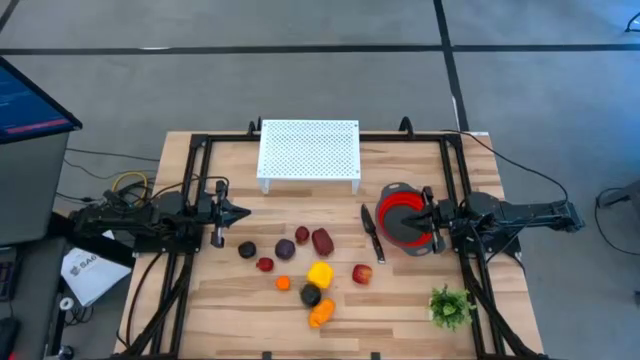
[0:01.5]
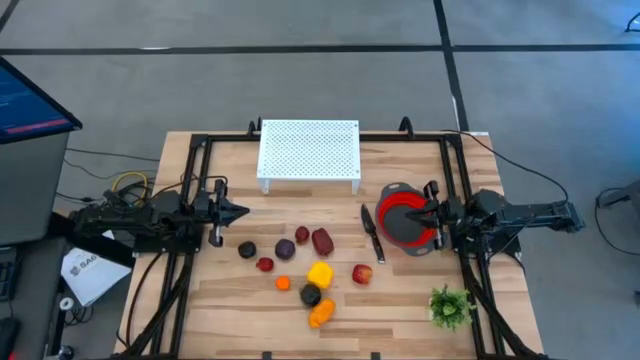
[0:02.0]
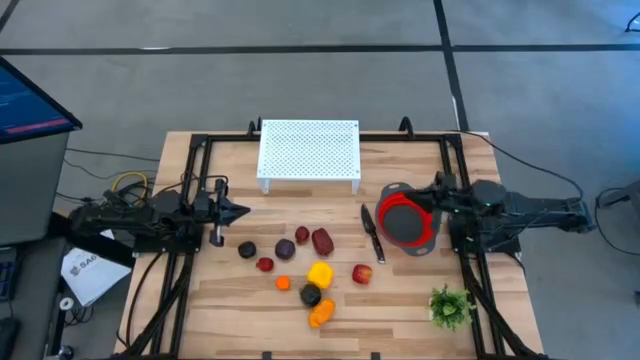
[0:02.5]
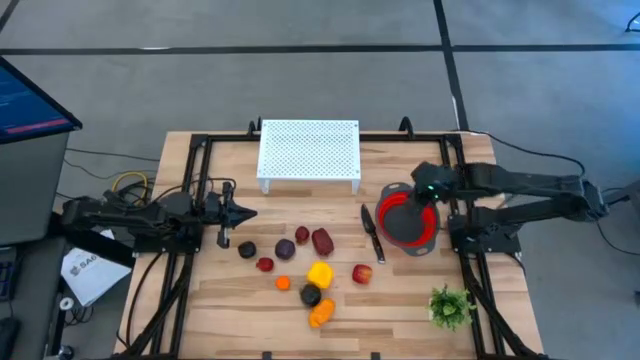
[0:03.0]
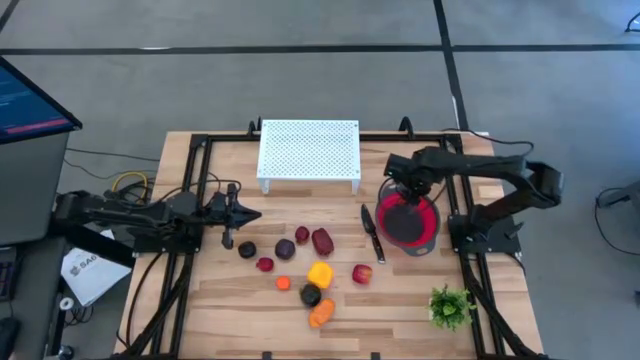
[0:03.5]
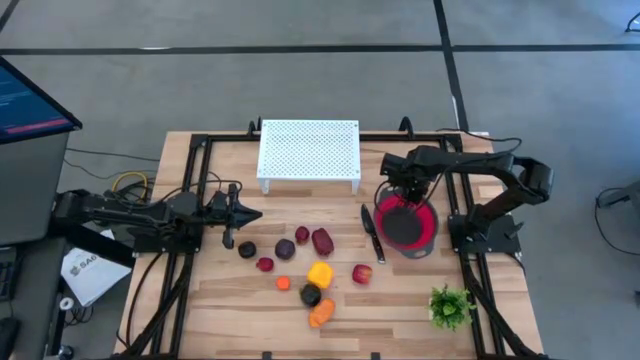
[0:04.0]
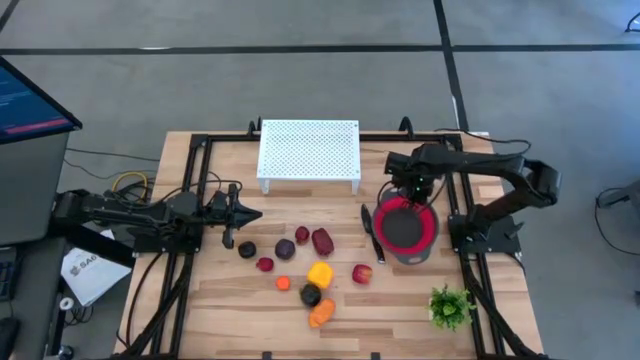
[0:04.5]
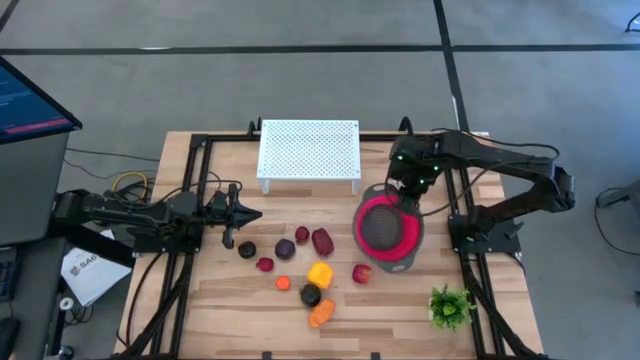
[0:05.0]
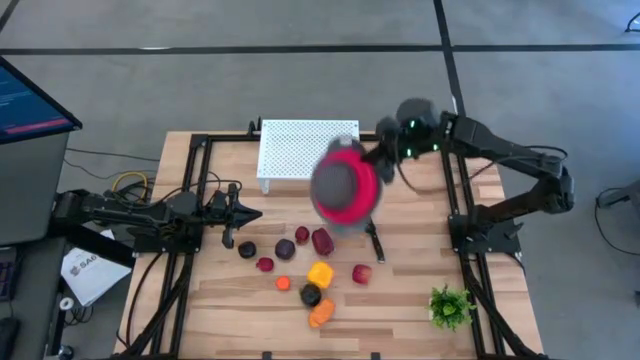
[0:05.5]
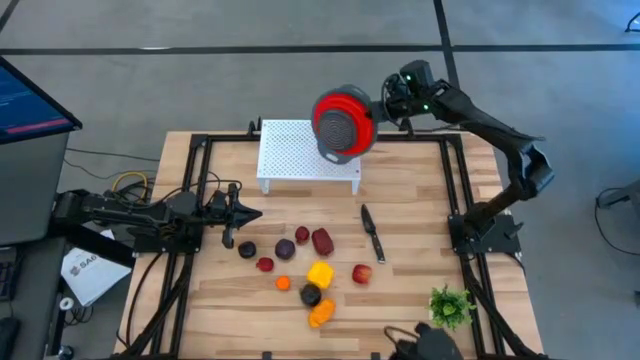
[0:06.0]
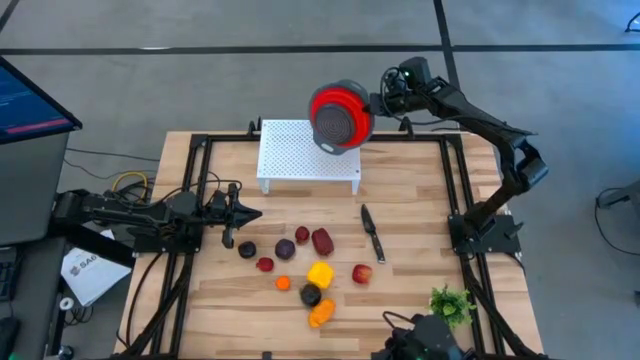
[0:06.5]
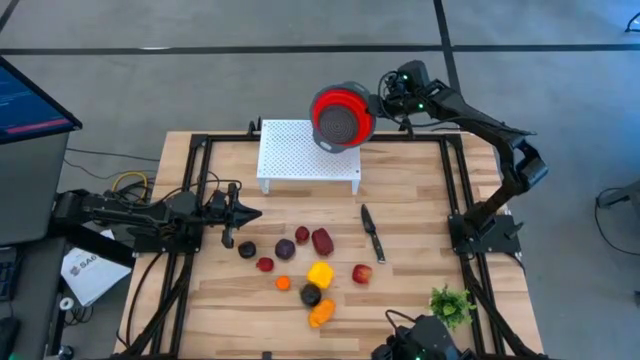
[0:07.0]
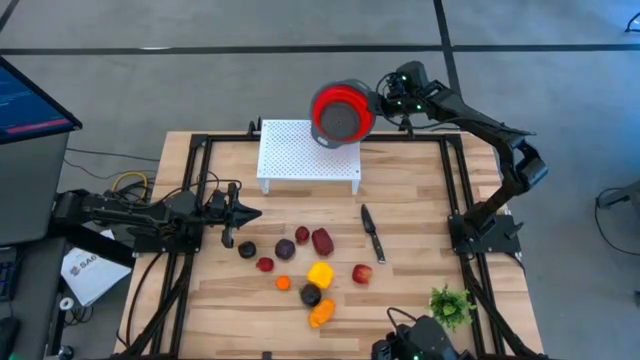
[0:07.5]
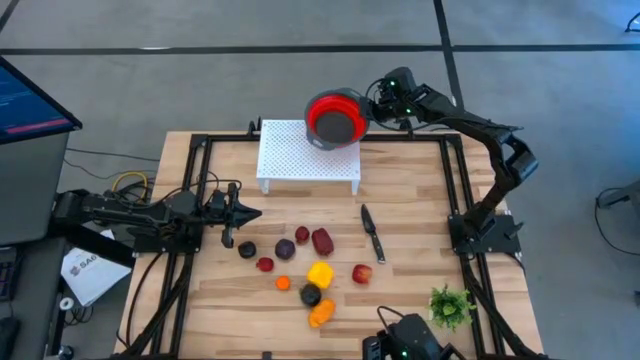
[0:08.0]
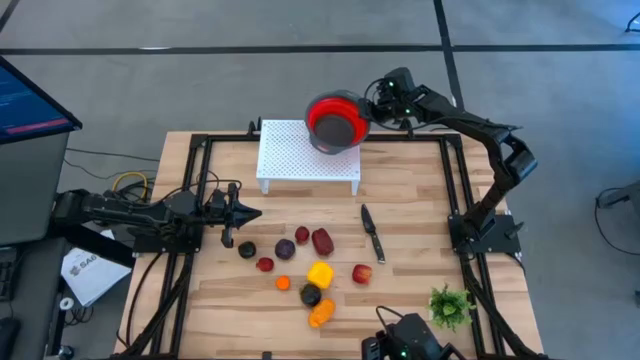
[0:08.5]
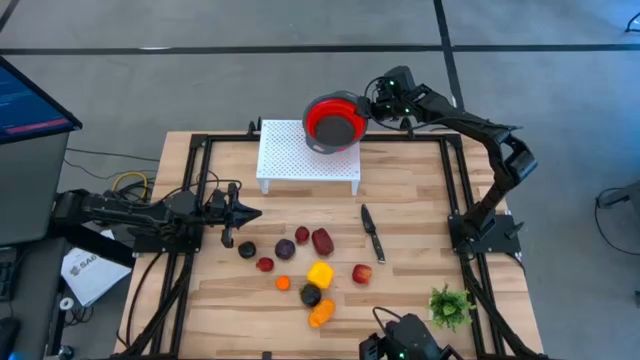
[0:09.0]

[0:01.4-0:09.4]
Task: Pick & Place Fruit
Put the strainer bowl on the shelf

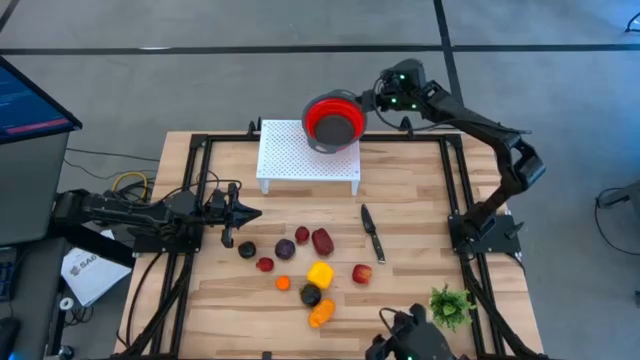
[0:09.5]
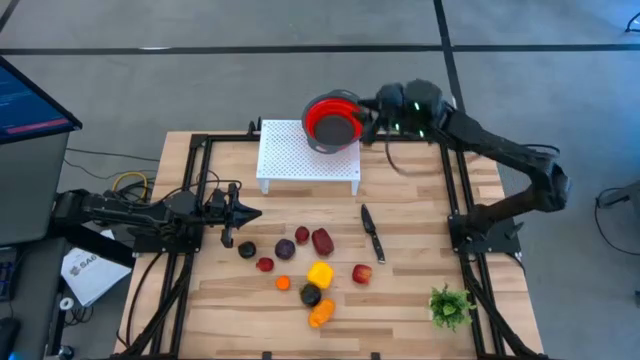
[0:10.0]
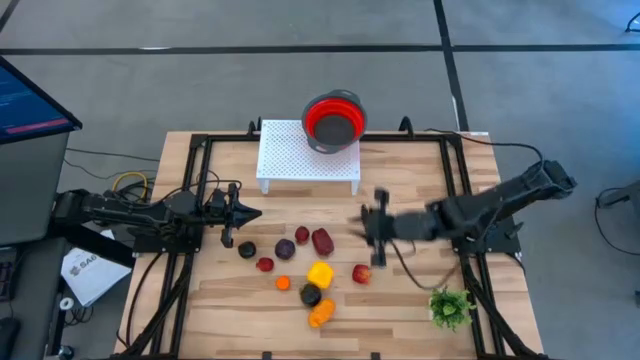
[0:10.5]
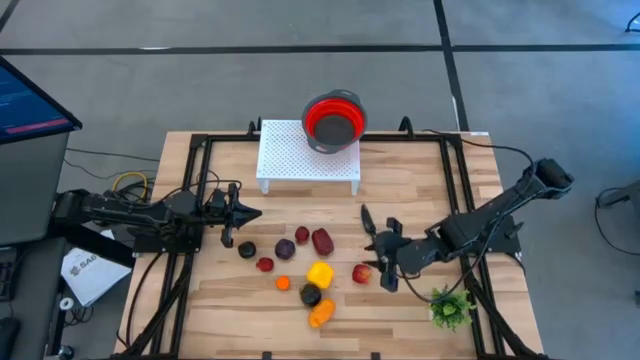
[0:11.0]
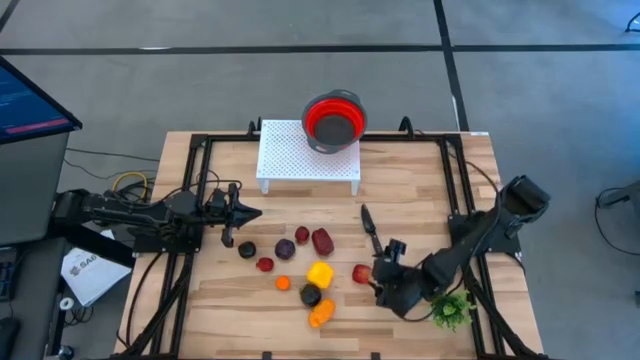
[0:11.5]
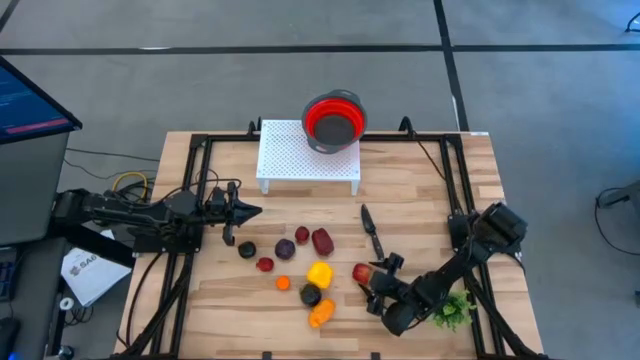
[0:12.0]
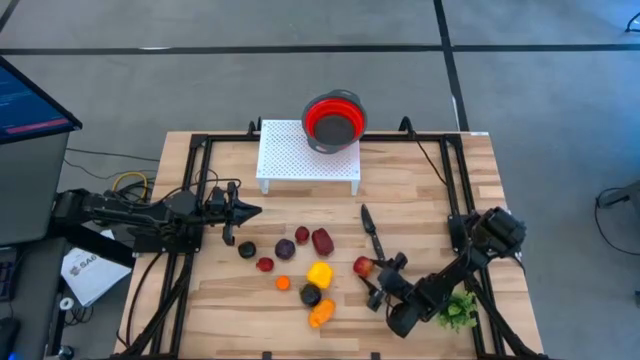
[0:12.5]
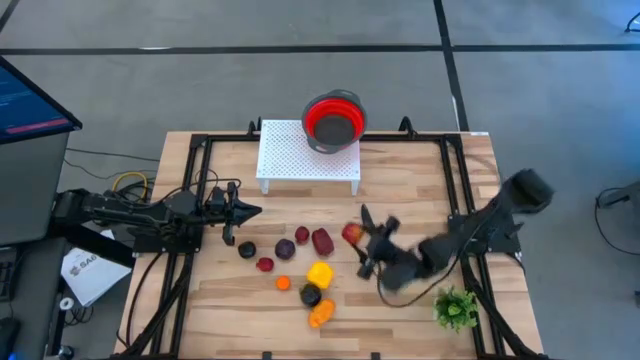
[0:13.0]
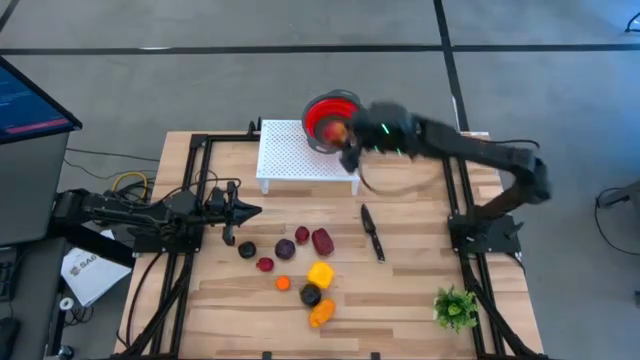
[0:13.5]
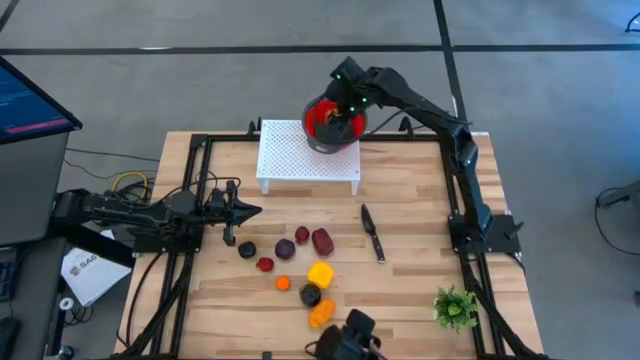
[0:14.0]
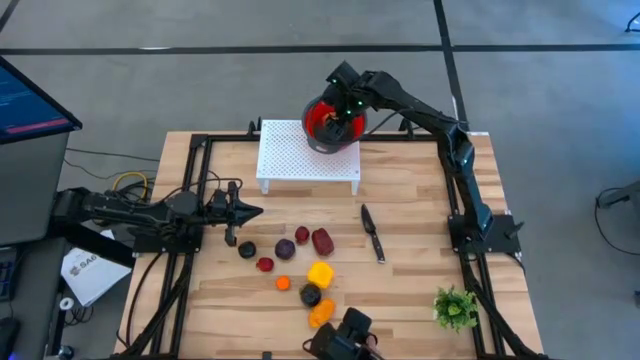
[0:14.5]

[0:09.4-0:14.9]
Put the right red apple into the strainer bowl on the shelf

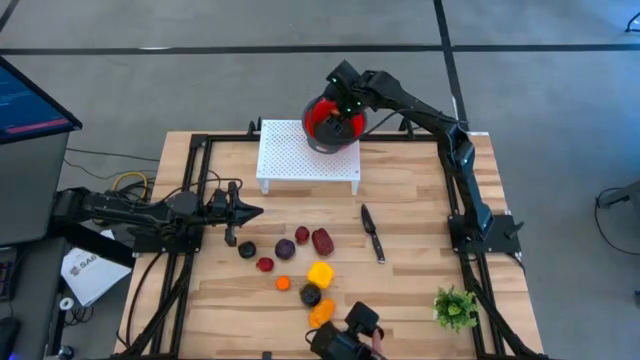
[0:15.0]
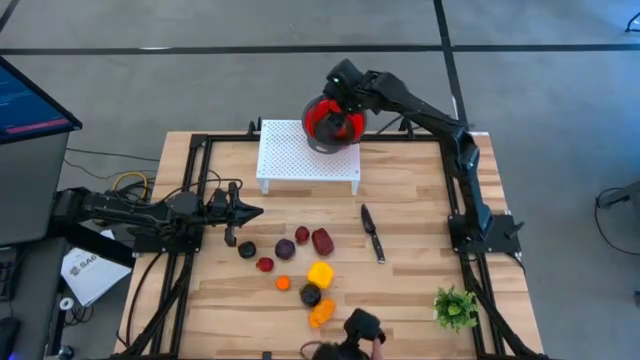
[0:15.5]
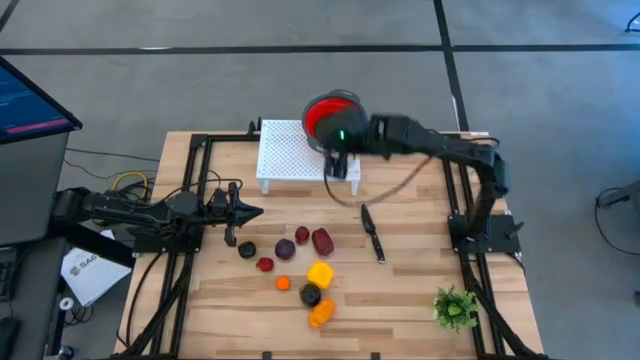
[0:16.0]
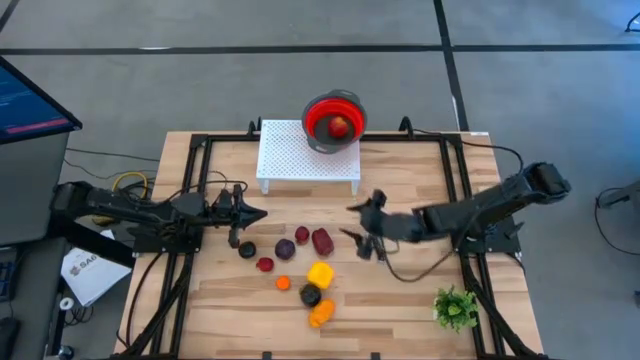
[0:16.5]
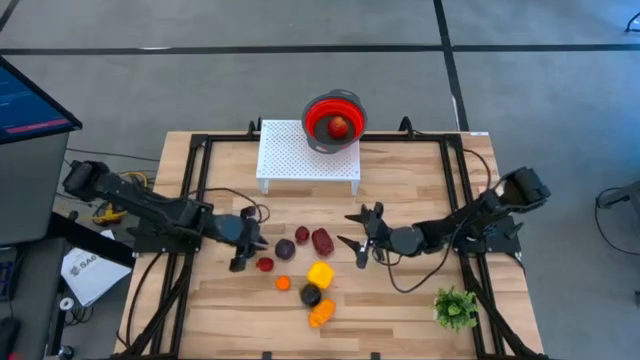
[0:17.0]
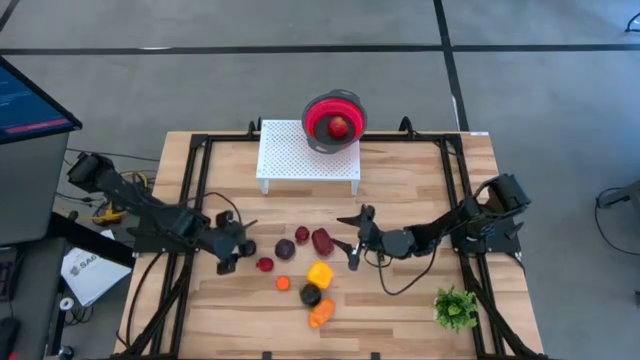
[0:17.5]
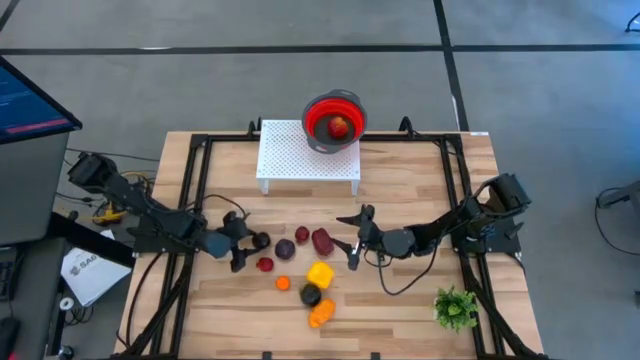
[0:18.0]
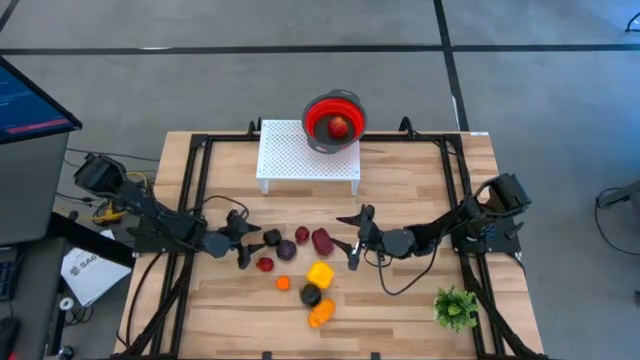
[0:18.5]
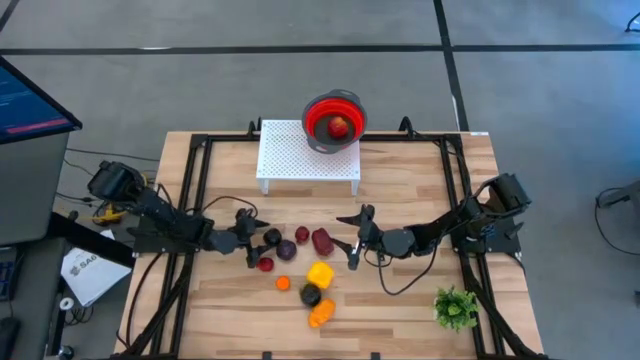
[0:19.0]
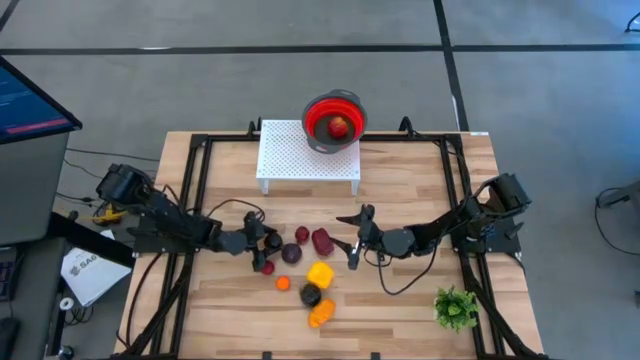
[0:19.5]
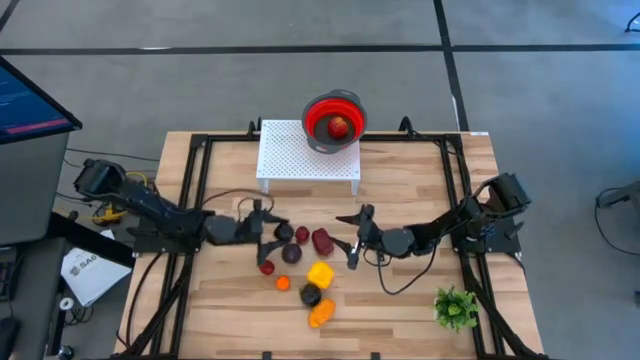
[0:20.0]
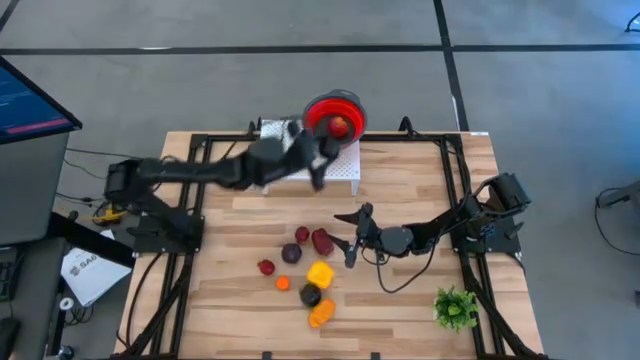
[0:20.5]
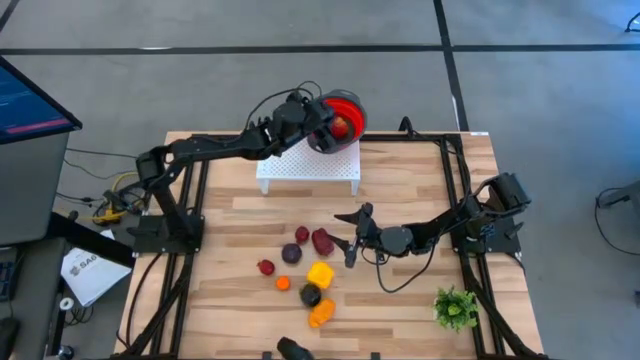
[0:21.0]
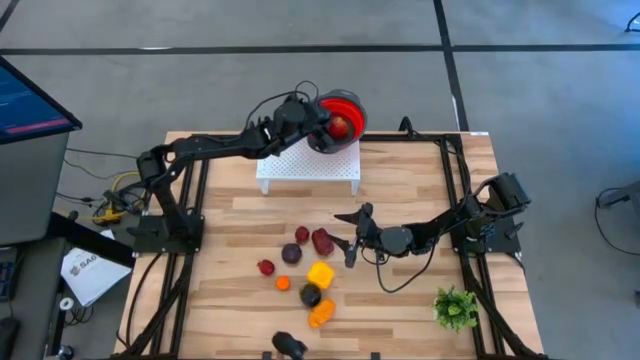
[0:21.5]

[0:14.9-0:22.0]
Put the left black plum into the strainer bowl on the shelf

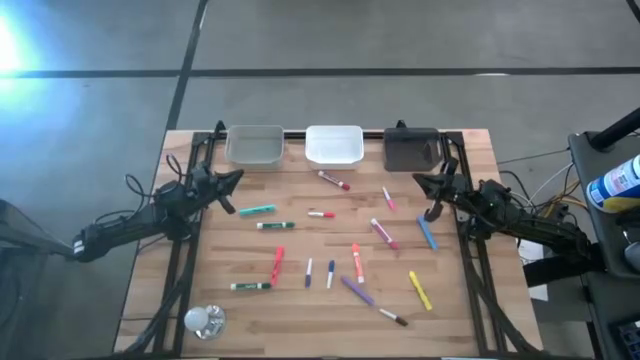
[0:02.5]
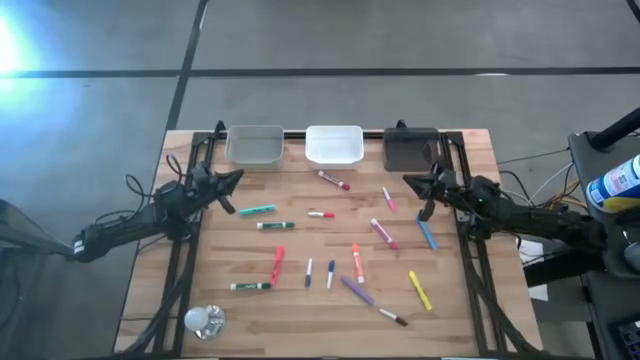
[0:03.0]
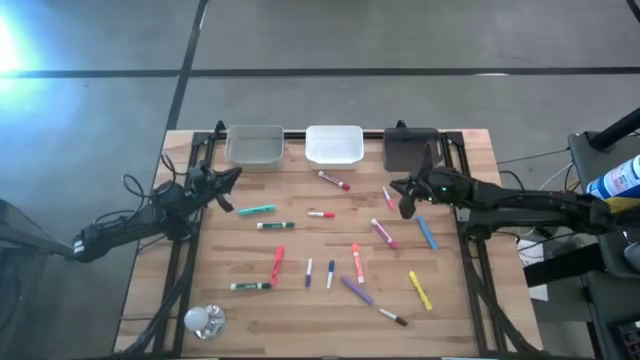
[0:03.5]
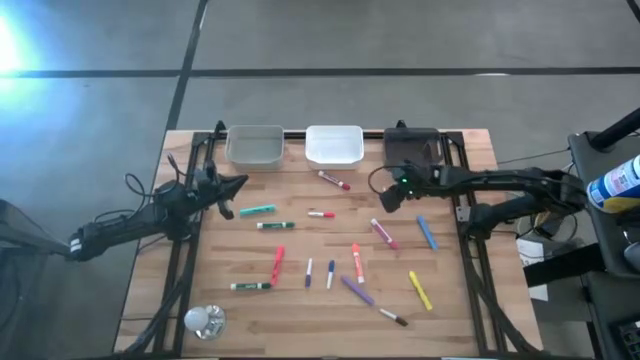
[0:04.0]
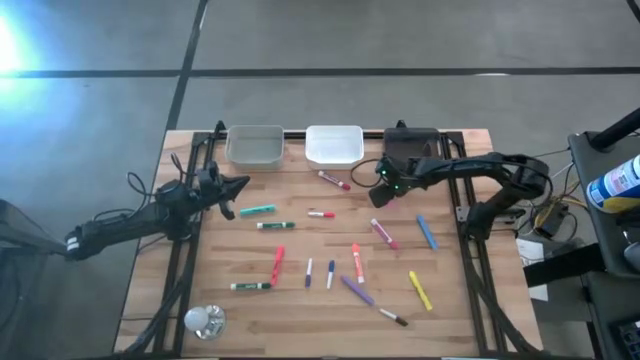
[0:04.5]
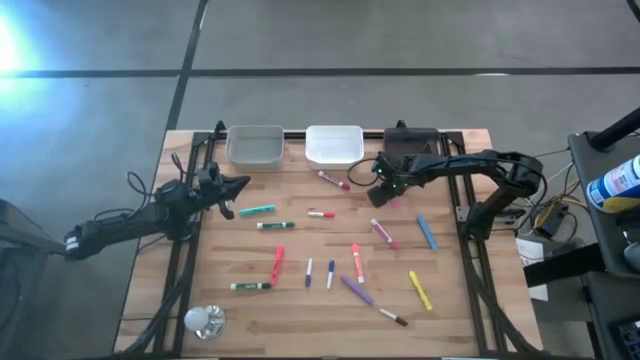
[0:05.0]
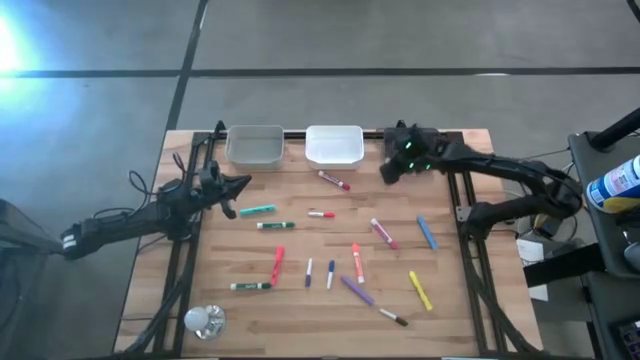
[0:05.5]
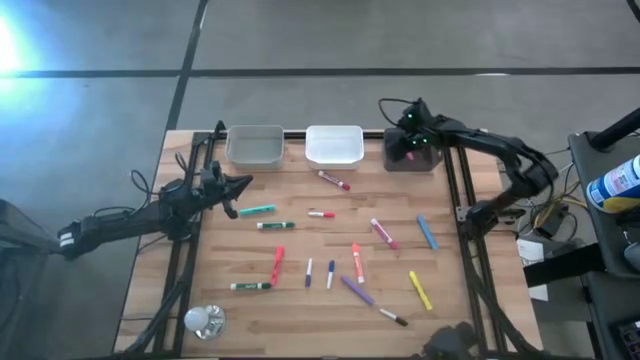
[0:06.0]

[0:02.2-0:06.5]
Task: Pick & Place Markers
Put the pink pen into the black bin
